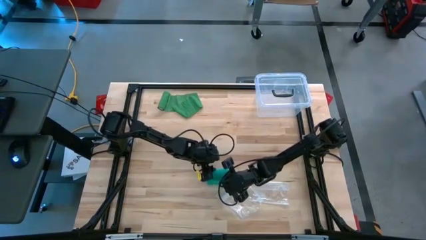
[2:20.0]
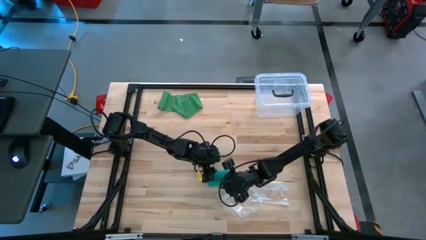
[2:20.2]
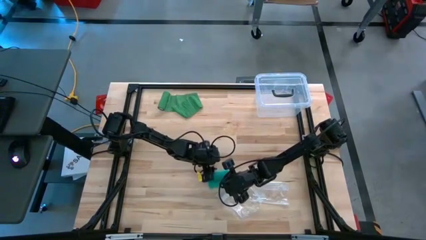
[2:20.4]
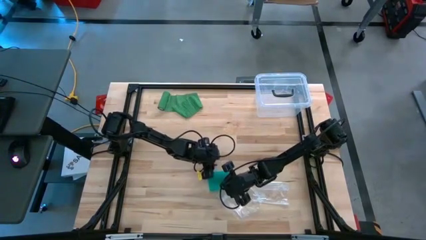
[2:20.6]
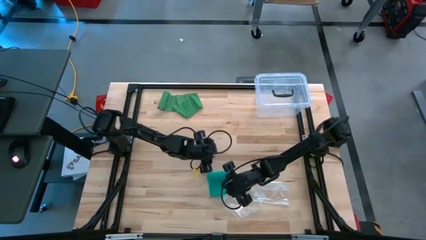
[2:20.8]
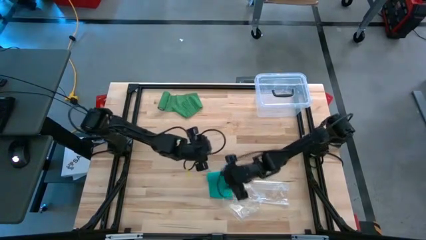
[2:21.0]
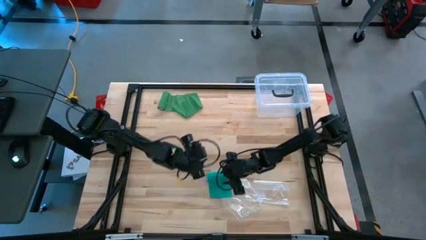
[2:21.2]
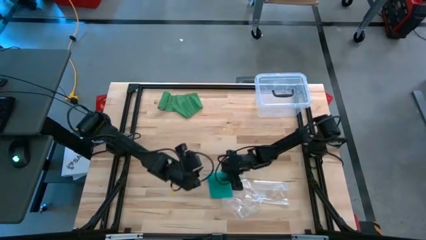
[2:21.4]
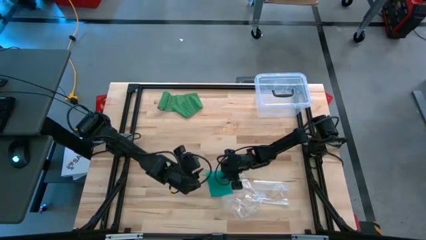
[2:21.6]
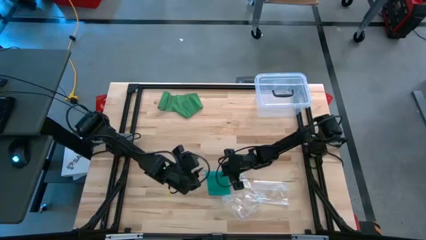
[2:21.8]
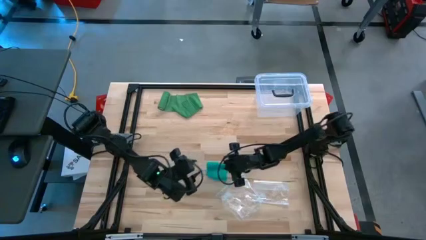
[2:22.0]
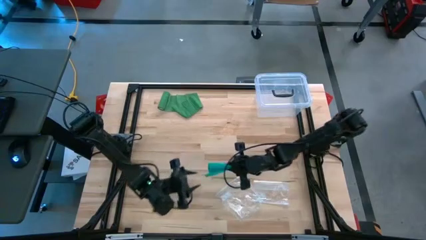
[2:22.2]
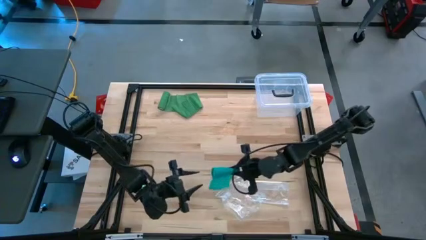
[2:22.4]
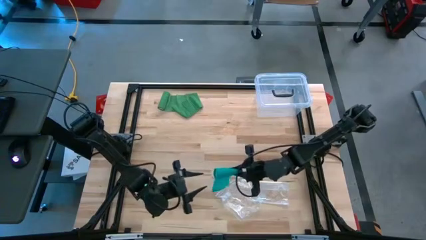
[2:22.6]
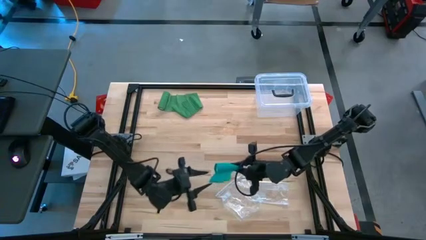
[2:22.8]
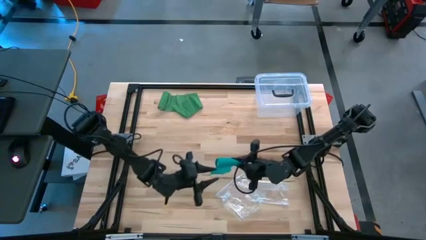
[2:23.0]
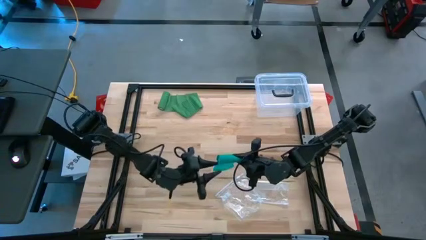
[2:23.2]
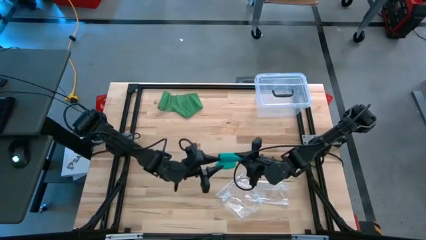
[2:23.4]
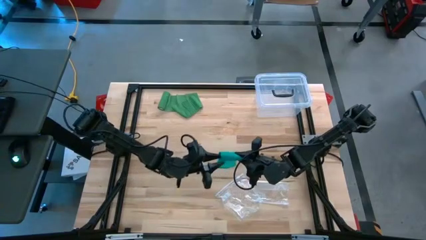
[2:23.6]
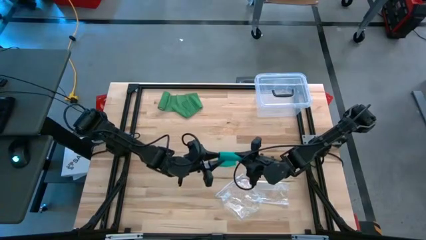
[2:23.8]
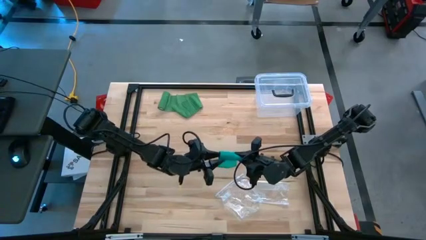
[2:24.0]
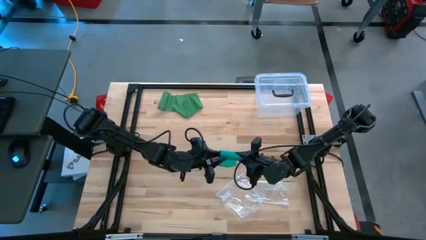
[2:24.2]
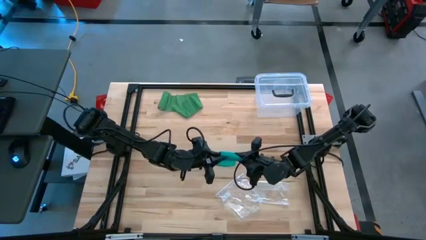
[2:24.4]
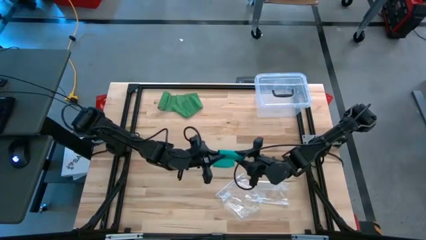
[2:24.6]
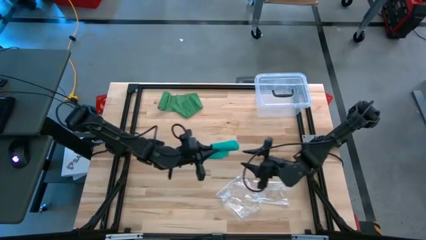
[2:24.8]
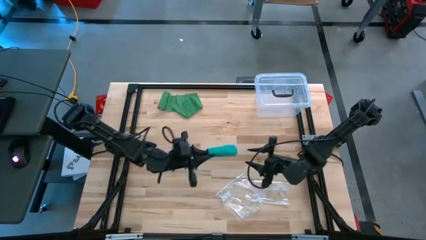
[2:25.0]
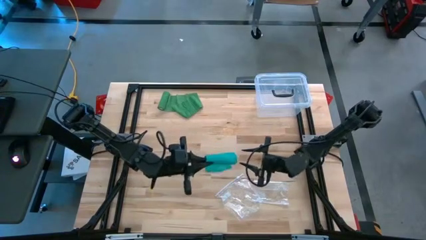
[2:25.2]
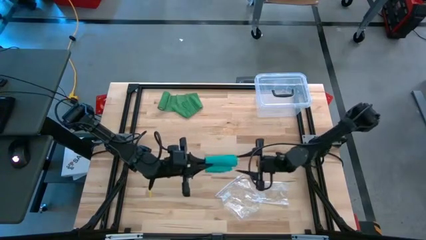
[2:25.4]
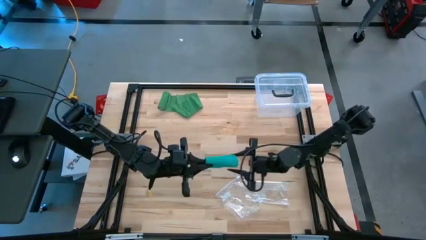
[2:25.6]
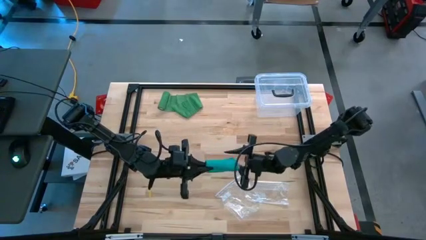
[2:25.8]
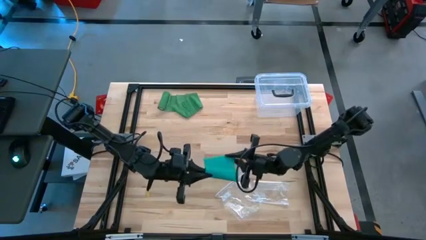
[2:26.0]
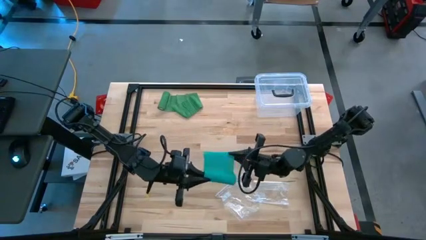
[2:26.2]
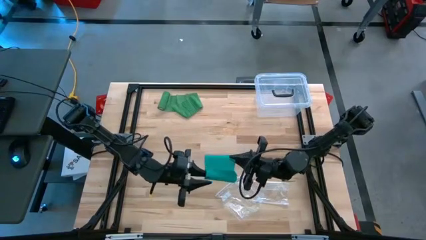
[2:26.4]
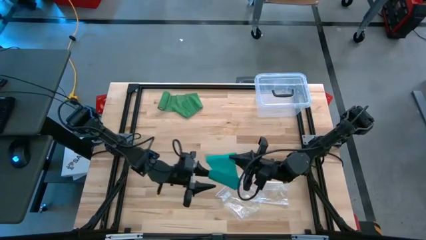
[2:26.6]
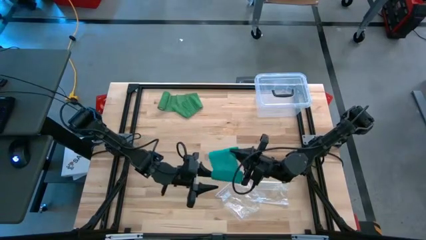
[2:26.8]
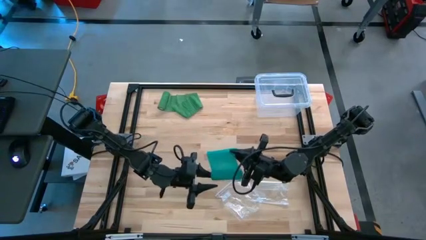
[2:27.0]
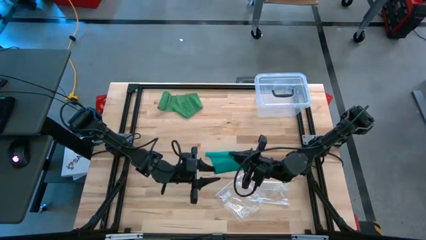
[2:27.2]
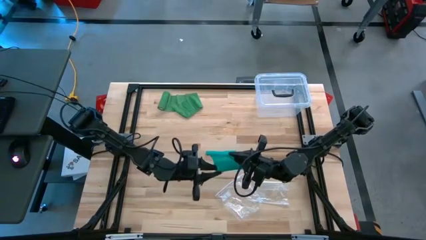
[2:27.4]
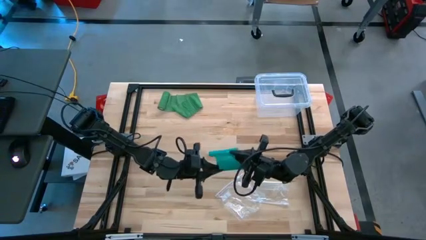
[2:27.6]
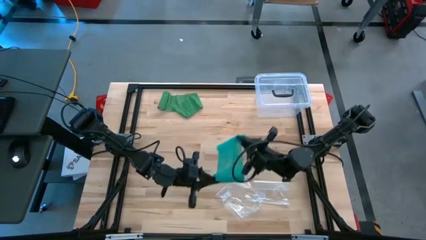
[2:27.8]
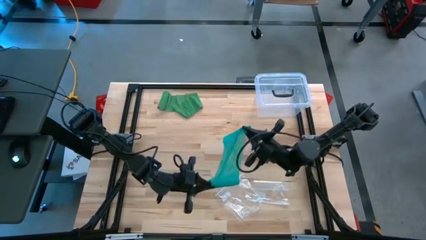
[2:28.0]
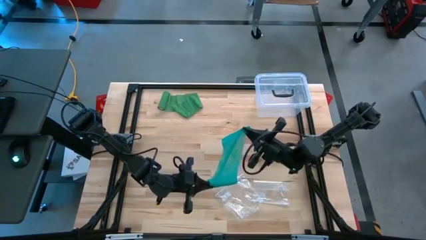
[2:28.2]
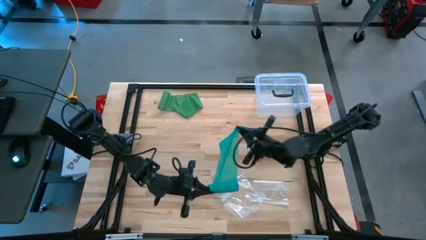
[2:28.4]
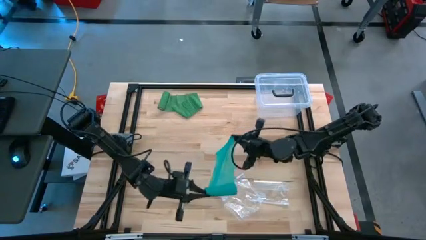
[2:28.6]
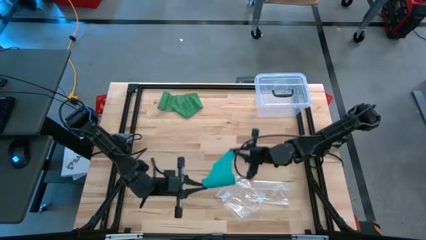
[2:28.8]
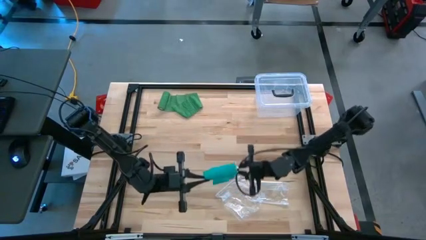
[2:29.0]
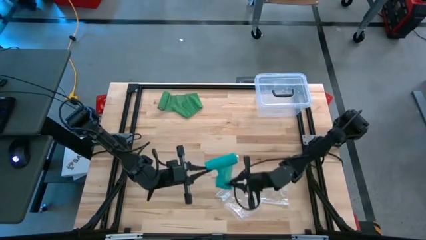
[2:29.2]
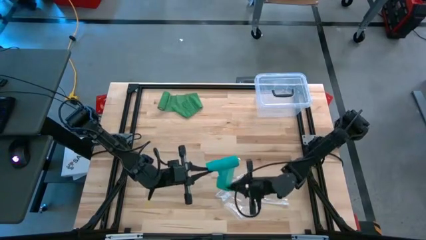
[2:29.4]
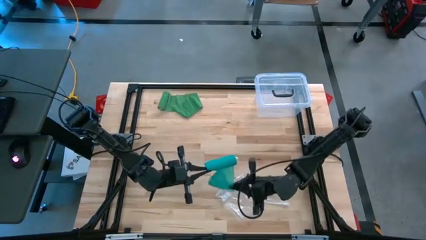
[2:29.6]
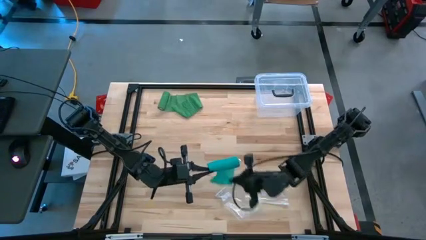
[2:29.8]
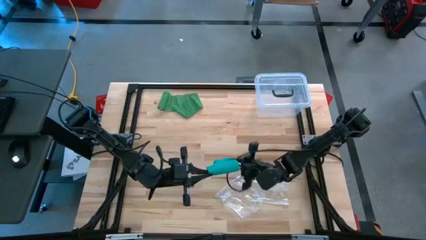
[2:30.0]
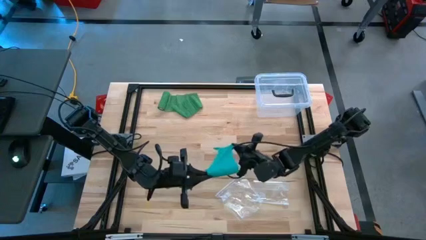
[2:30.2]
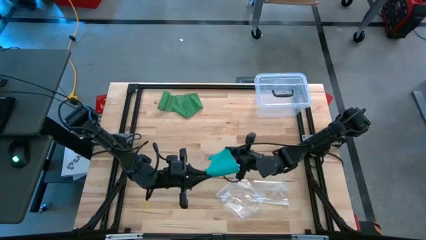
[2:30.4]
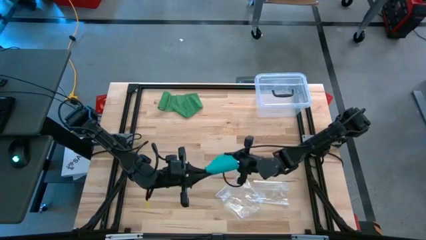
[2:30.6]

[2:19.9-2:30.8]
Task: Roll bandage
Roll the blue bandage

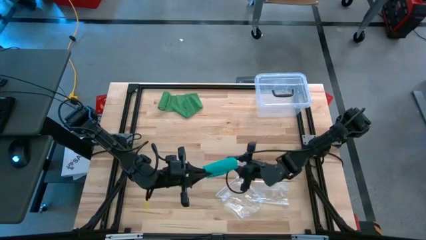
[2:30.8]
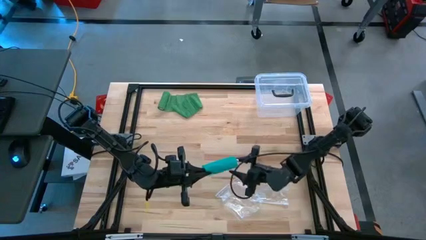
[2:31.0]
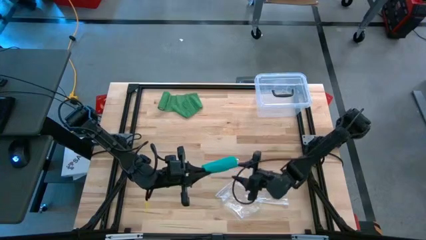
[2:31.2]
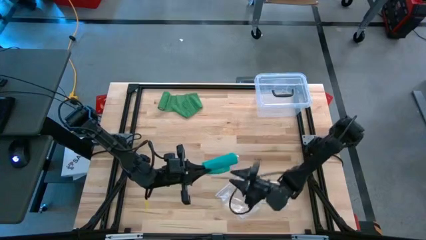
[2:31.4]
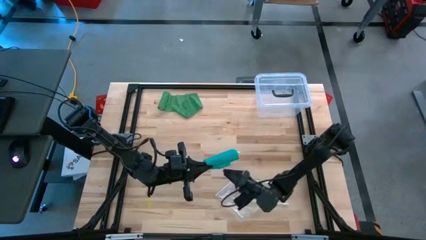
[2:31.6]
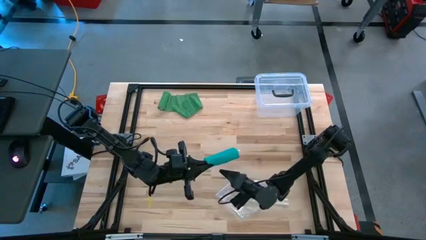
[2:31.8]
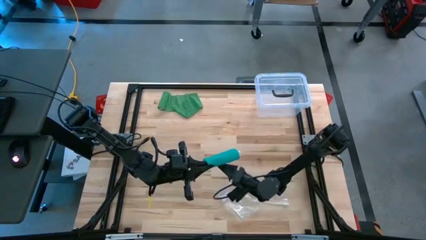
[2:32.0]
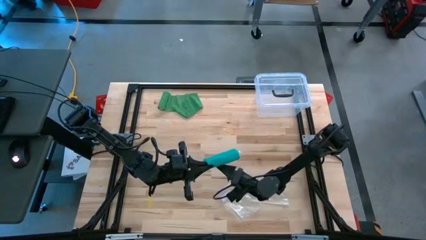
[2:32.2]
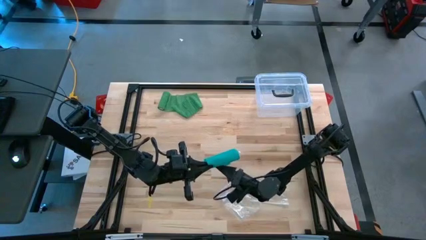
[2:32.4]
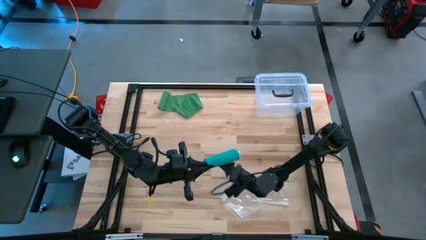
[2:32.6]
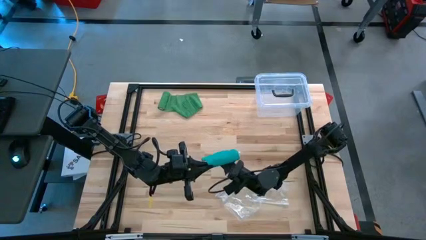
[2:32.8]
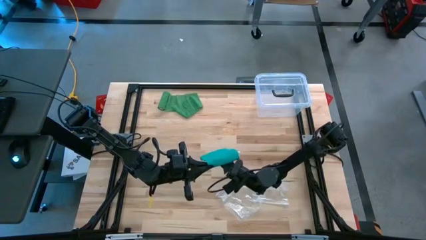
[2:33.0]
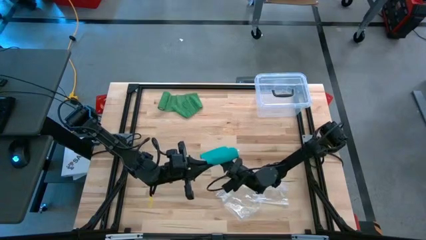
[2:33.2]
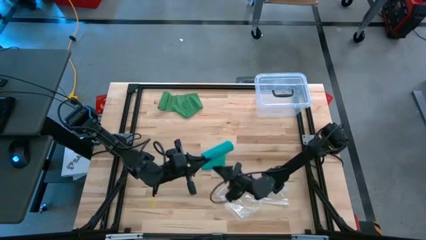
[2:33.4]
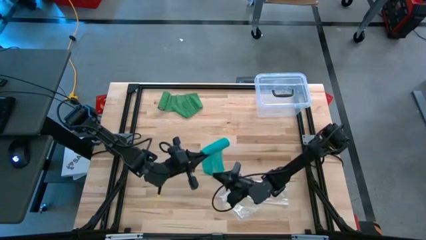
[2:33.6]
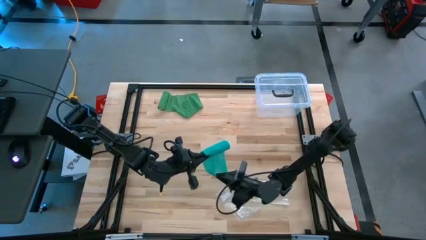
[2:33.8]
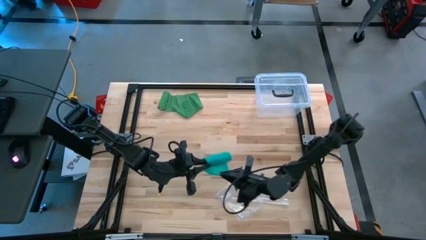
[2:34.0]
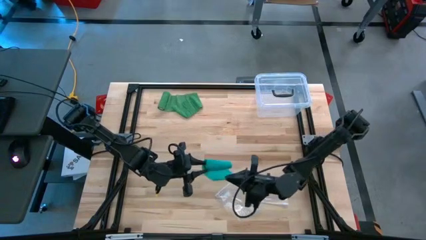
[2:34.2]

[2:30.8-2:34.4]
Roll the blue bandage

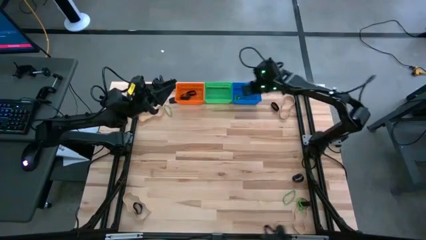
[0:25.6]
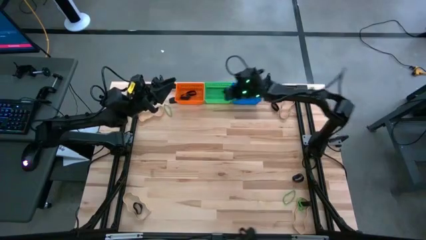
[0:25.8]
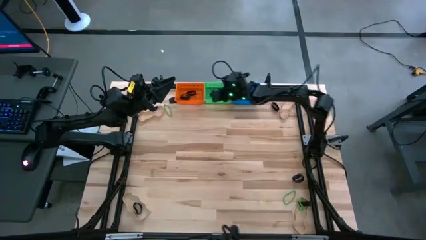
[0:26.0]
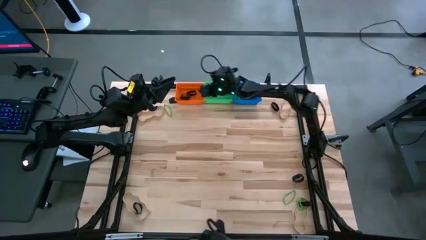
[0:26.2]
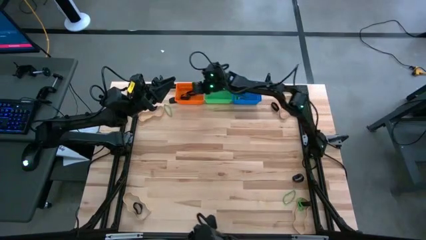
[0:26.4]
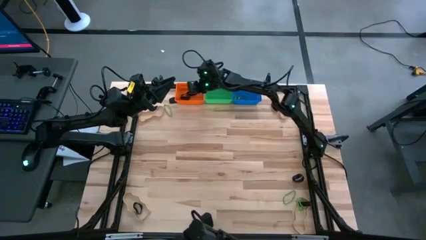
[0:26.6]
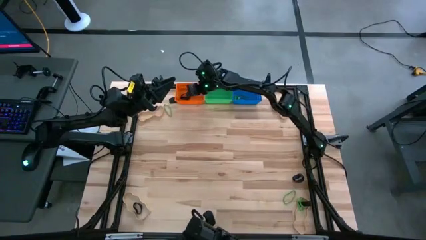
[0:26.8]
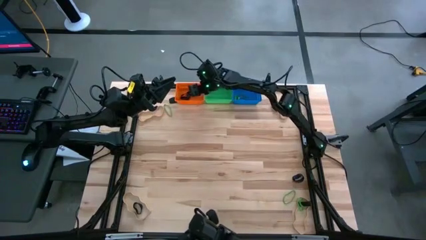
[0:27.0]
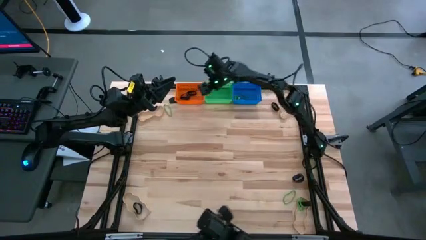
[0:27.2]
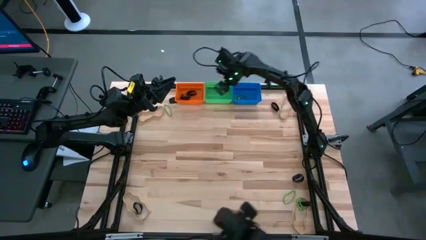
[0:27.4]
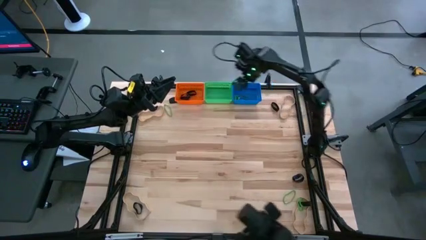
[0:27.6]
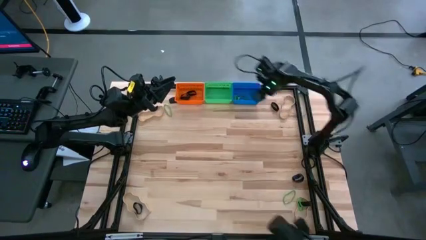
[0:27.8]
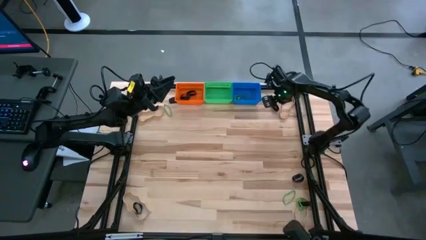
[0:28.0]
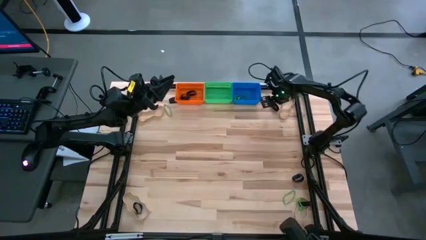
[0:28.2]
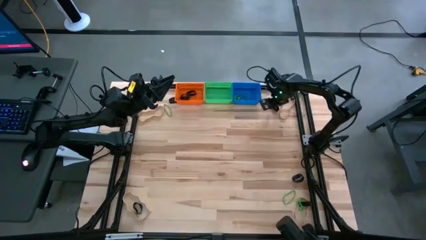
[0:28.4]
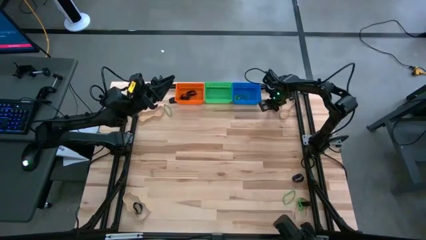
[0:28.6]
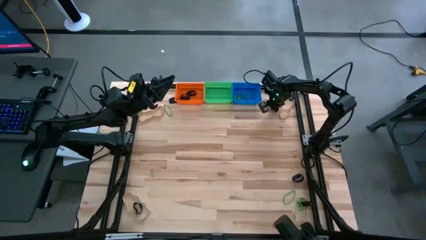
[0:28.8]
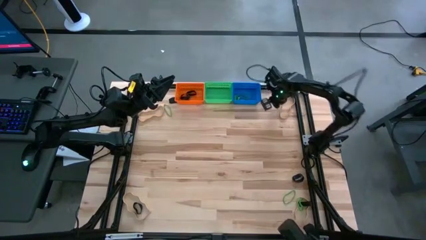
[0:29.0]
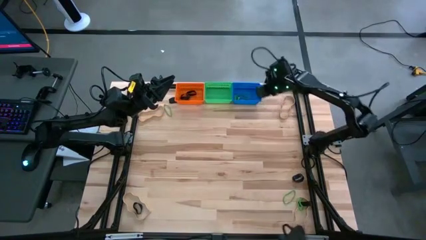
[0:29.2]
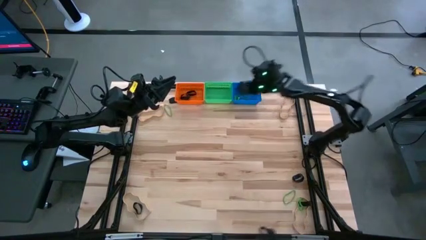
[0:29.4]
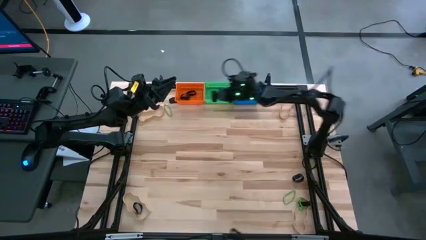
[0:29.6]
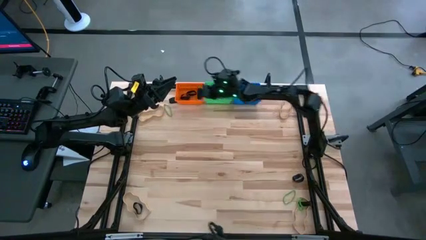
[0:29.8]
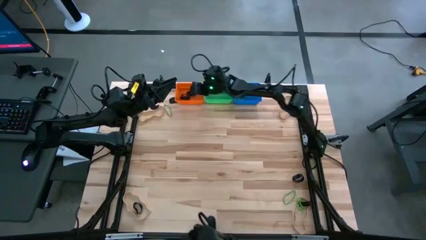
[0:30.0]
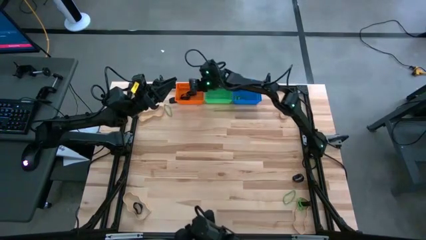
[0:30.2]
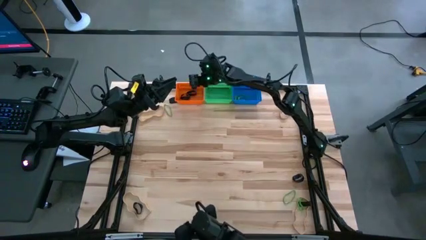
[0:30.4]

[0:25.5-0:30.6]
Task: Sort rubber bands into baskets
Put the black rubber band into the orange basket
